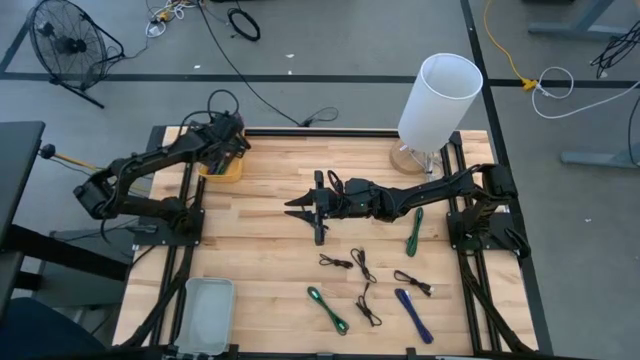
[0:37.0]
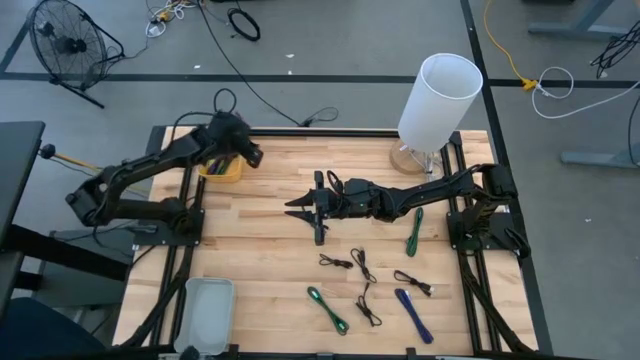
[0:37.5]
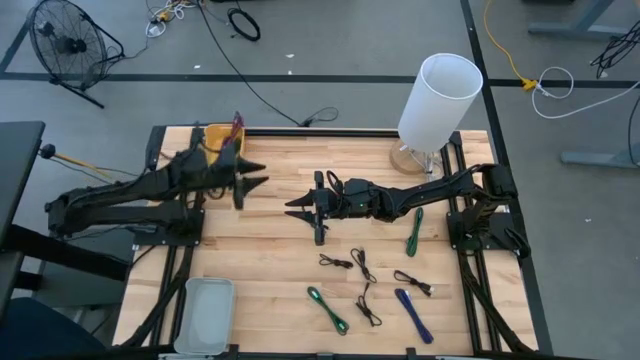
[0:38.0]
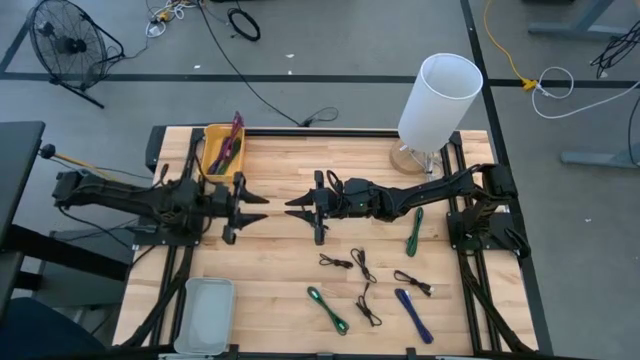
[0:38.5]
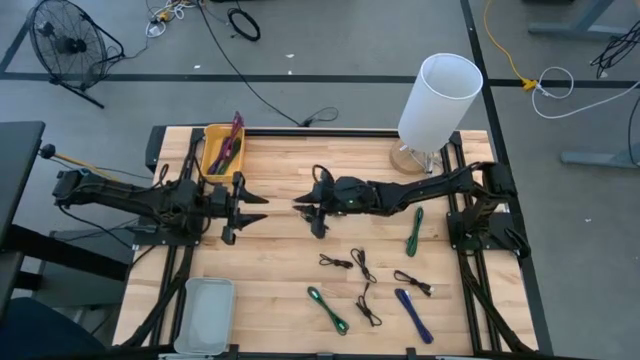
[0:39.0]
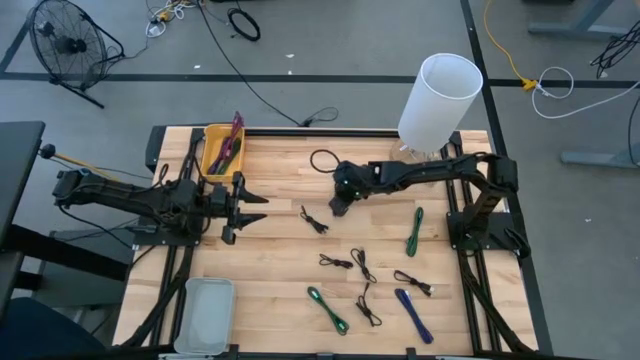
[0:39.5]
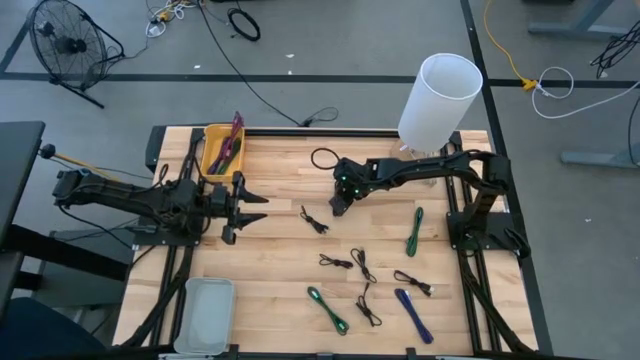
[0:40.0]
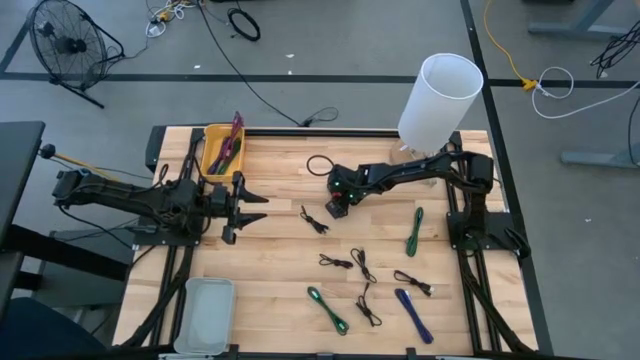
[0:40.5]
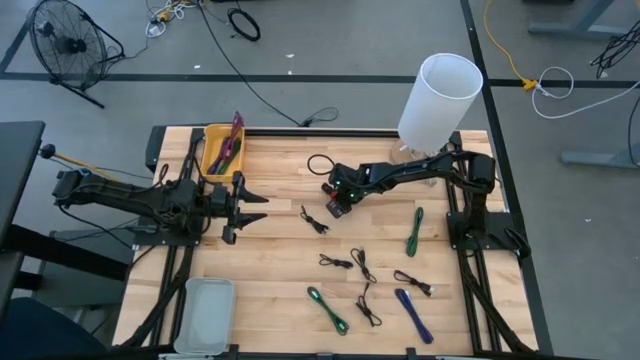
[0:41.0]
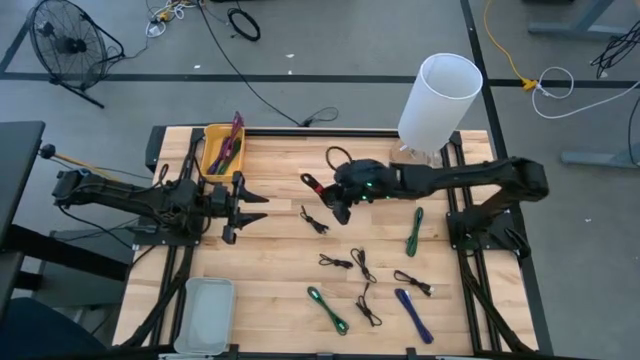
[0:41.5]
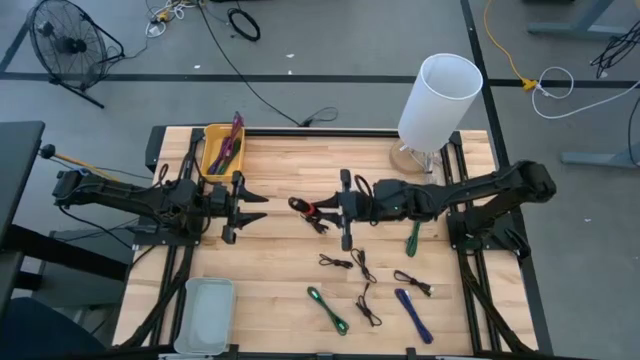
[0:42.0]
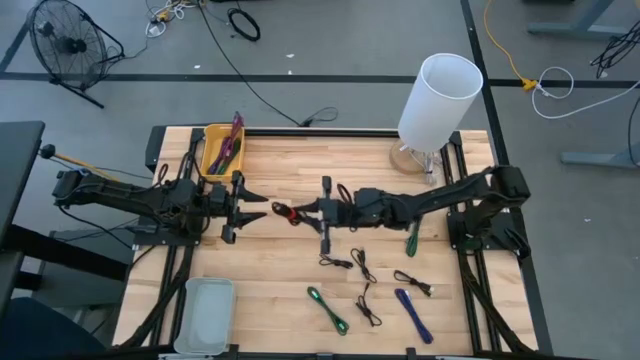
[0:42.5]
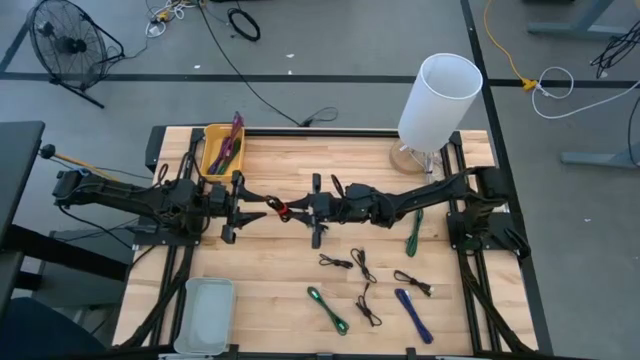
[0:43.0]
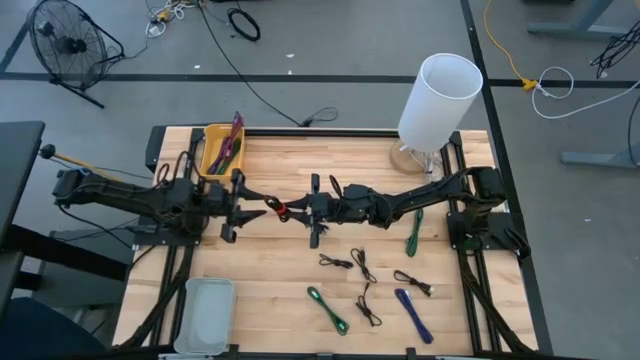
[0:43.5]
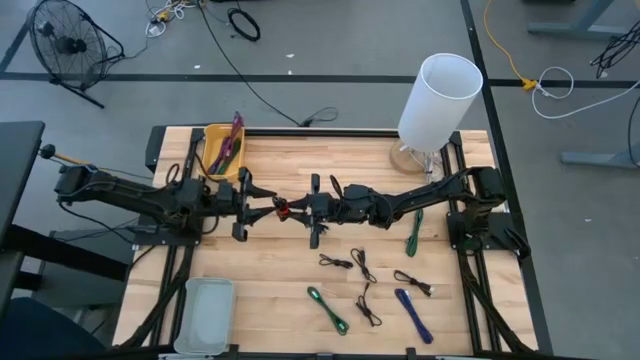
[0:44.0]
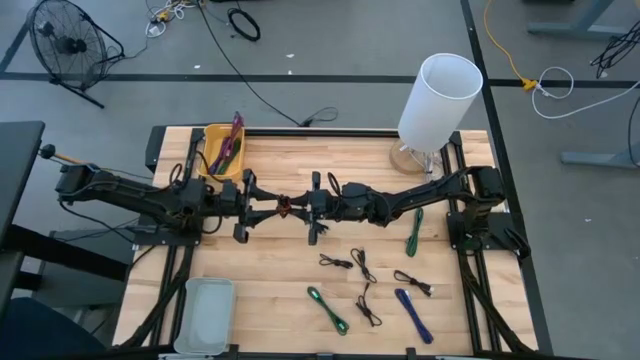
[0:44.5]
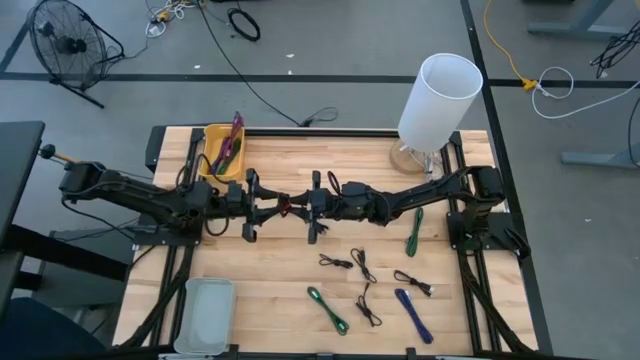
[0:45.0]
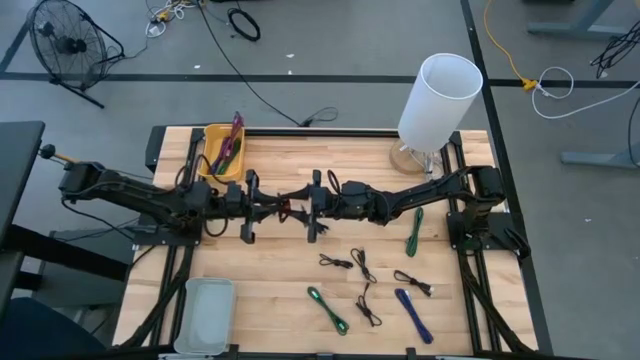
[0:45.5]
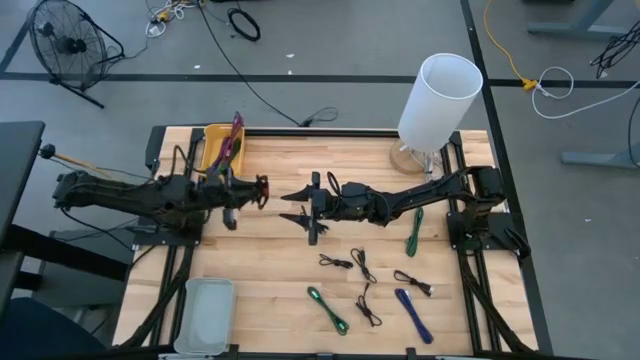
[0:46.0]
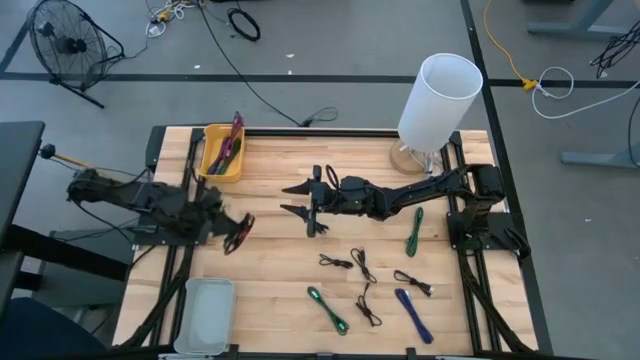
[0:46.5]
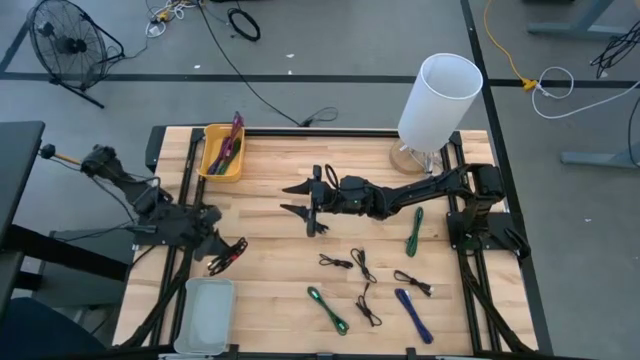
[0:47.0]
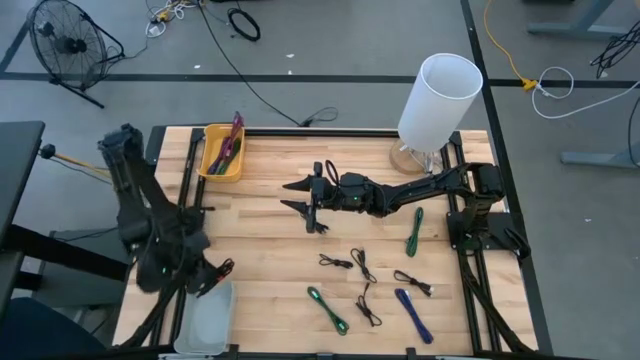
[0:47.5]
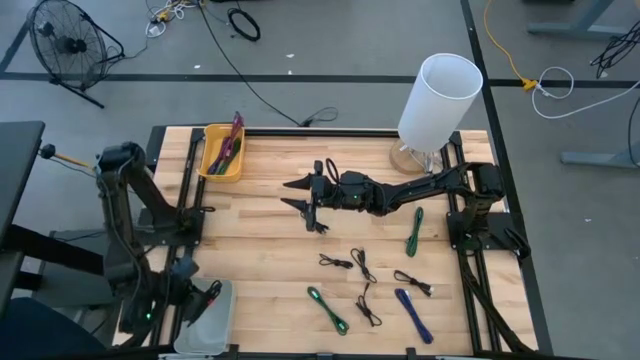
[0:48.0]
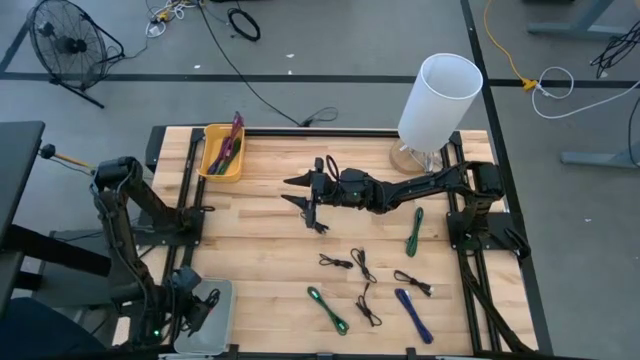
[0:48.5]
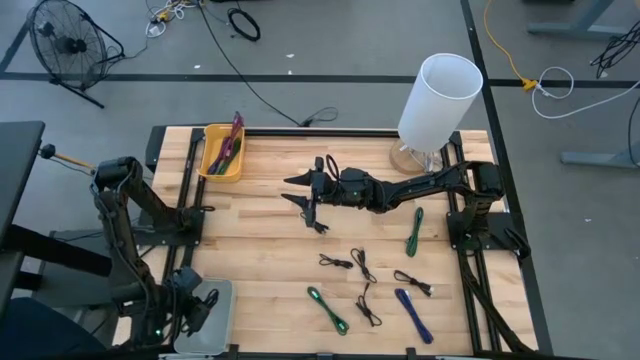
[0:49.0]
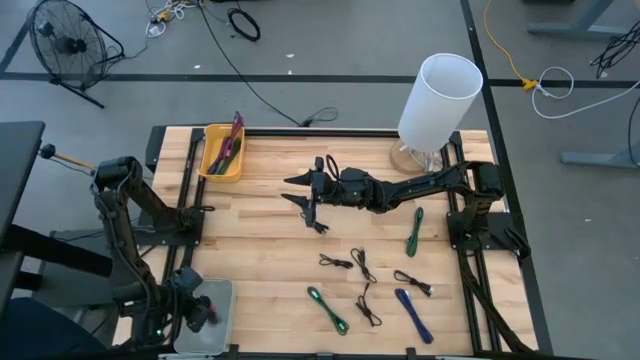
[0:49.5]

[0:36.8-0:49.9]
Task: Pick & Place USB Port
Put the black charger cable into the gray bin

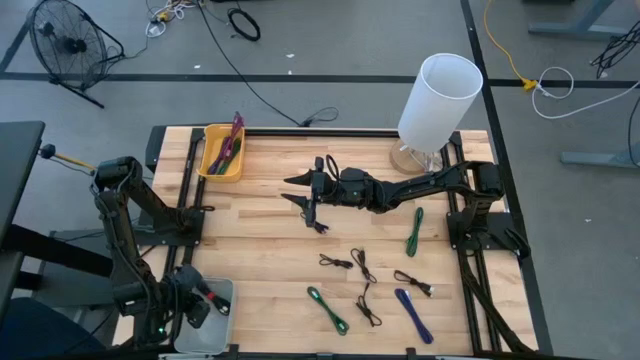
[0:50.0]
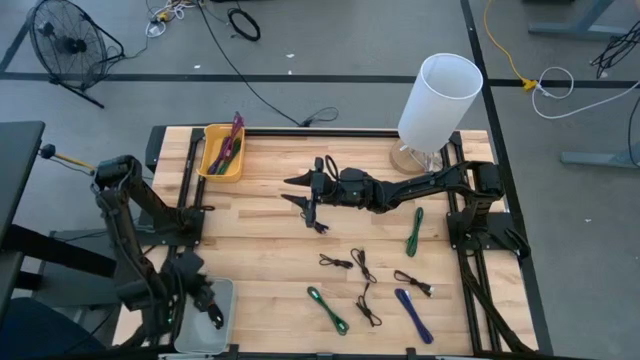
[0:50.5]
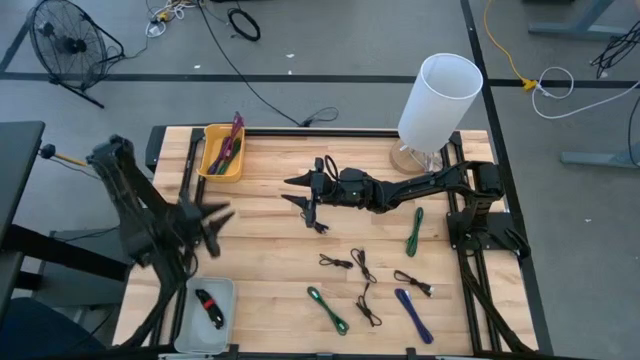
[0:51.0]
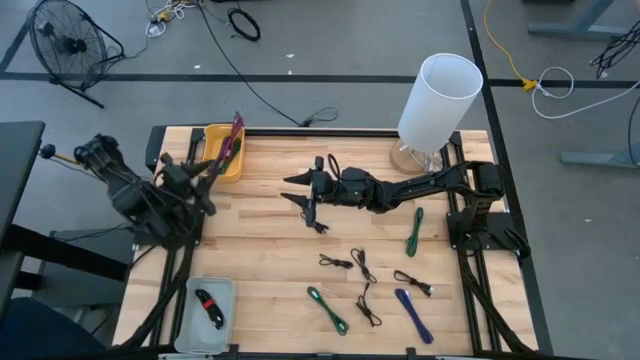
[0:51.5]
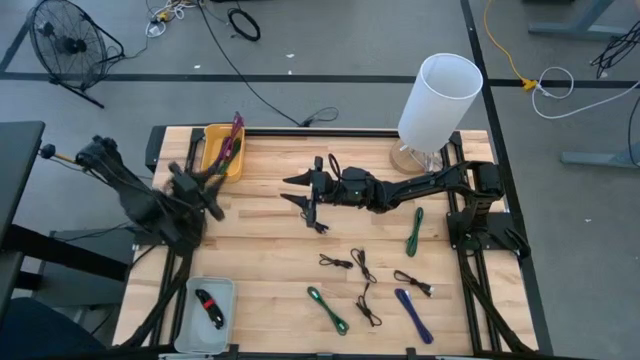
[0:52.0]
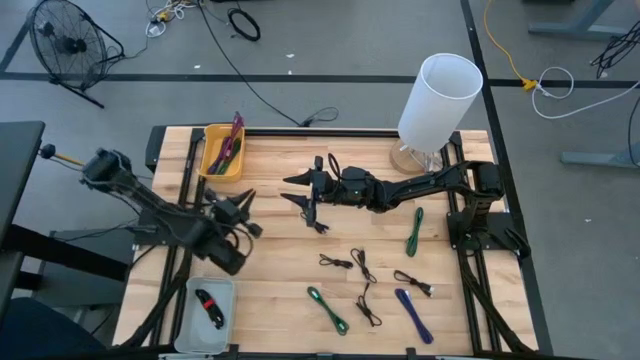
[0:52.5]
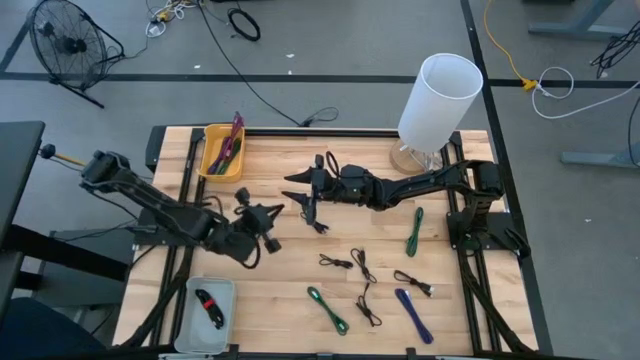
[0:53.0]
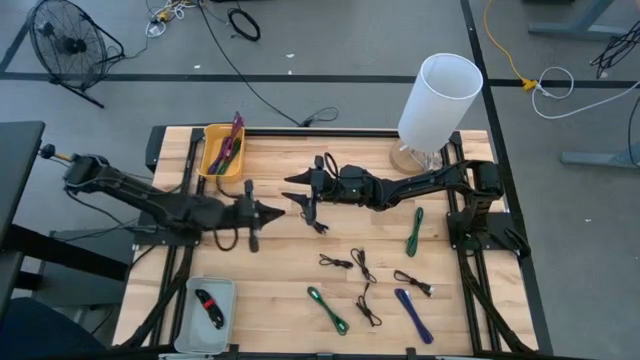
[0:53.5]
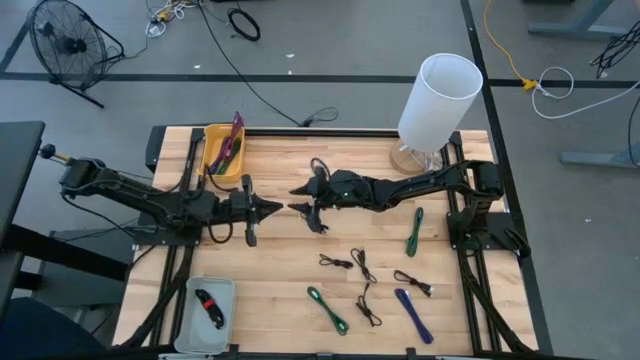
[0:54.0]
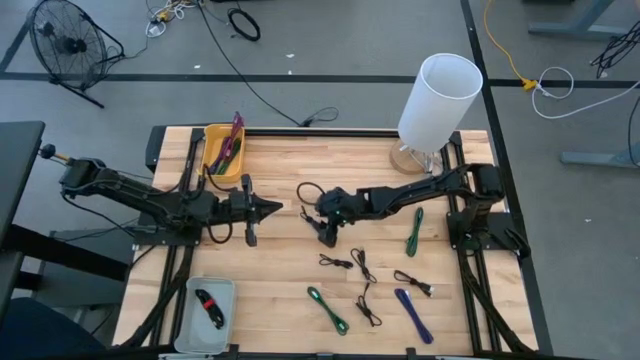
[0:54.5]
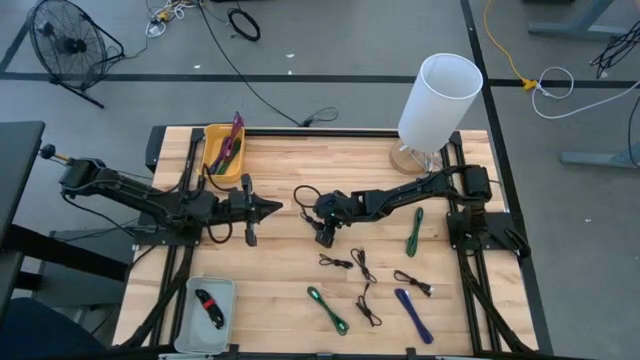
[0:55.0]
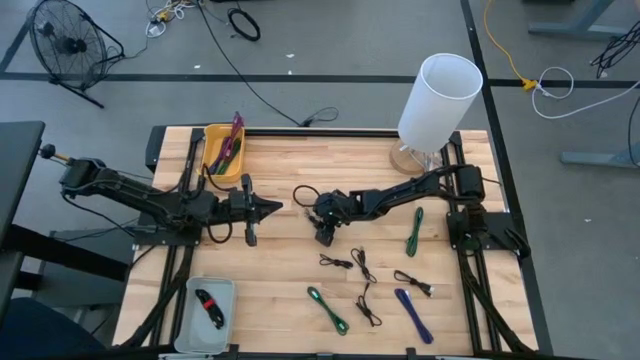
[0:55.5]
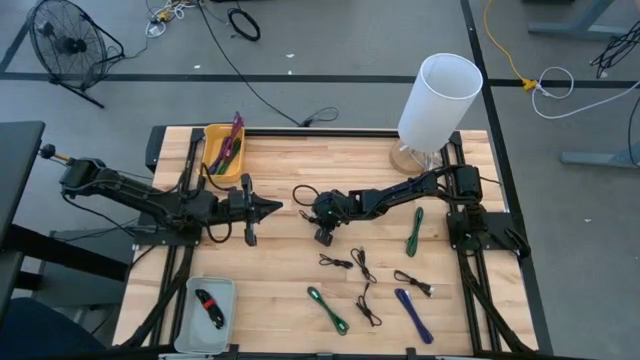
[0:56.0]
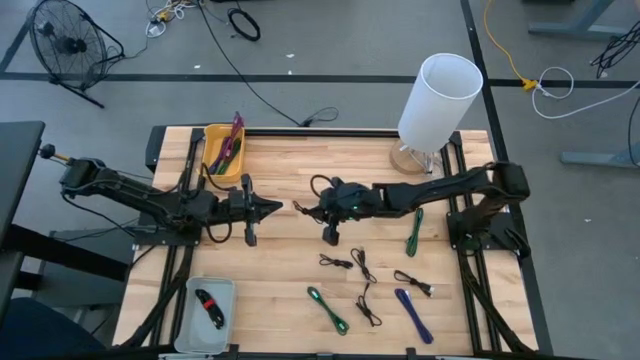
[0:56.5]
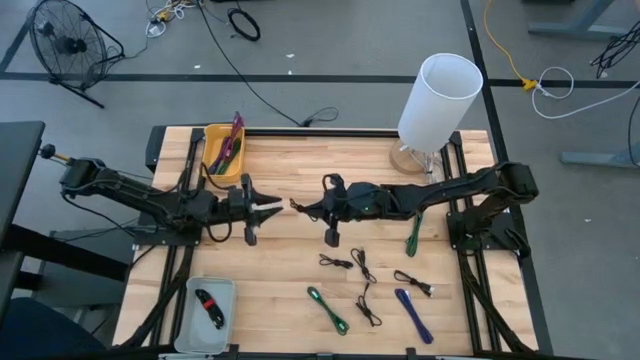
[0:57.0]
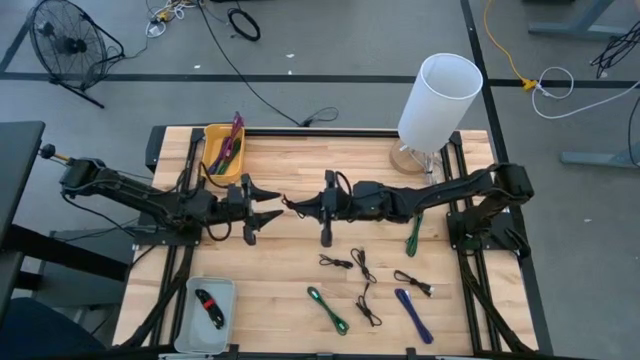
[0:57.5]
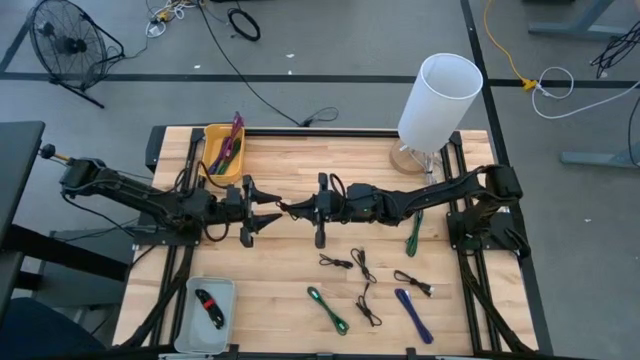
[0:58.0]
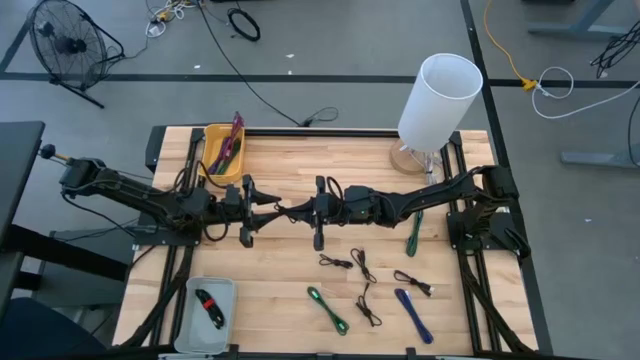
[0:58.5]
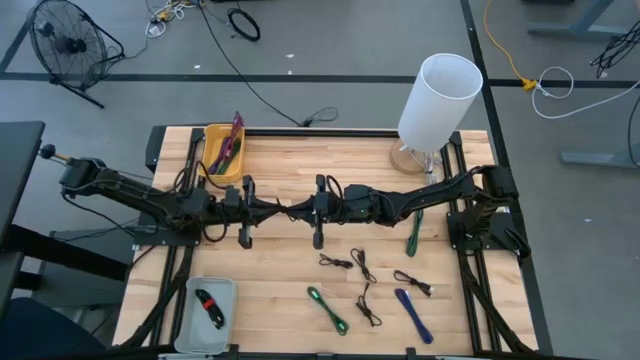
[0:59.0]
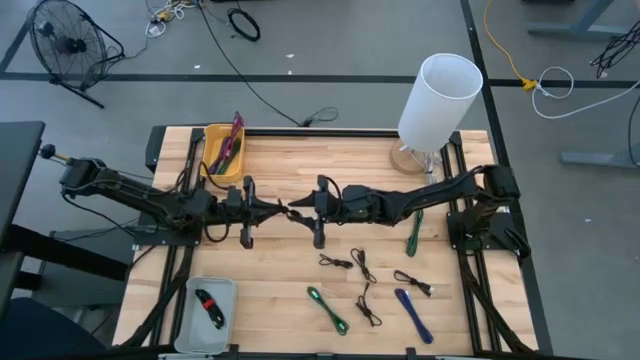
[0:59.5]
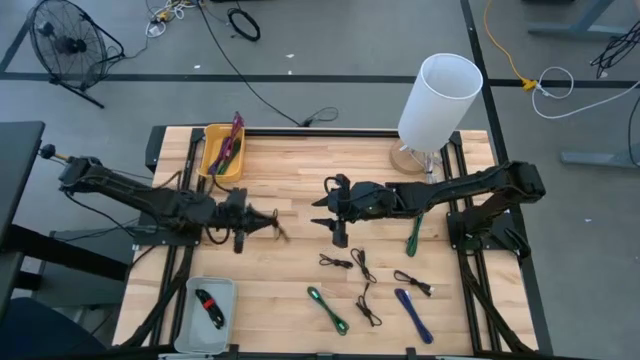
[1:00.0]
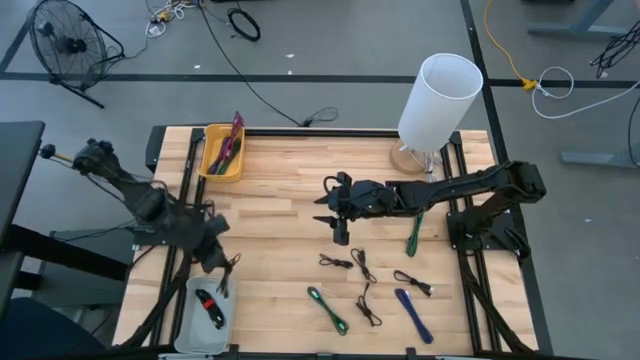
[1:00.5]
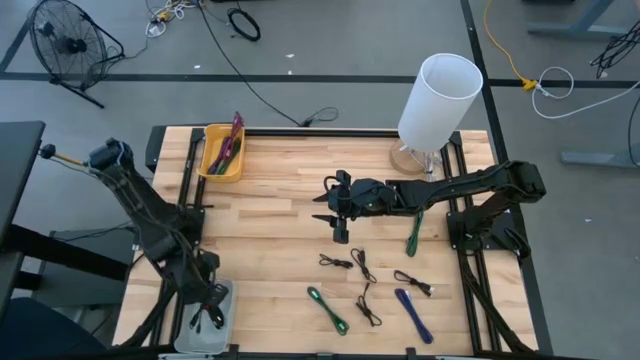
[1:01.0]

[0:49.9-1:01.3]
Put the black charger cable into the gray bin
